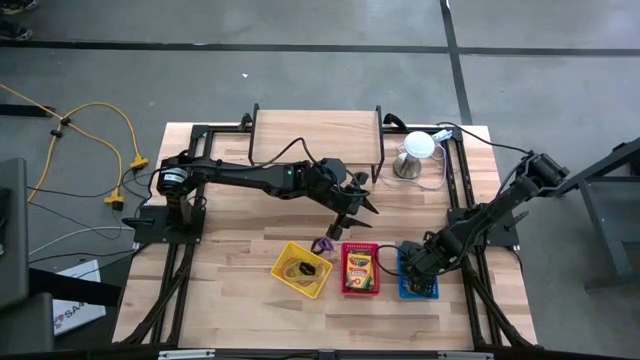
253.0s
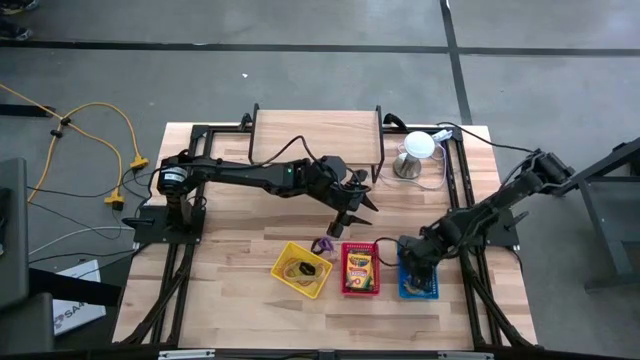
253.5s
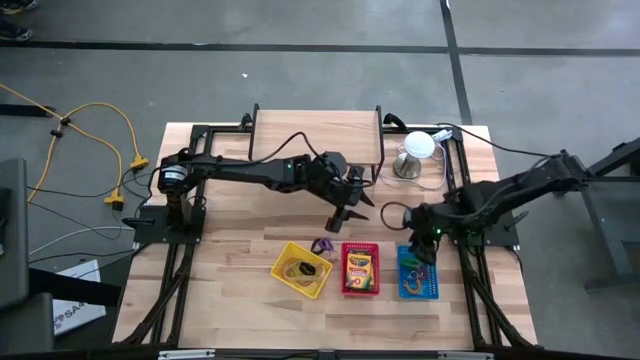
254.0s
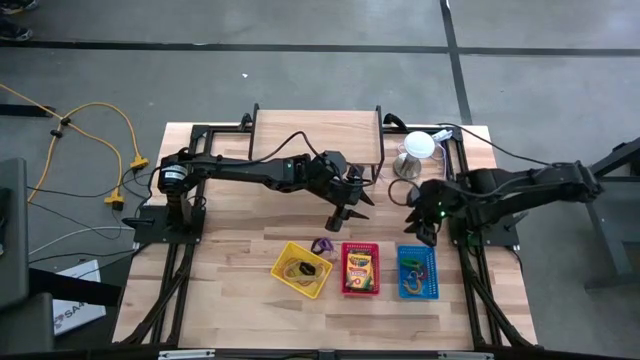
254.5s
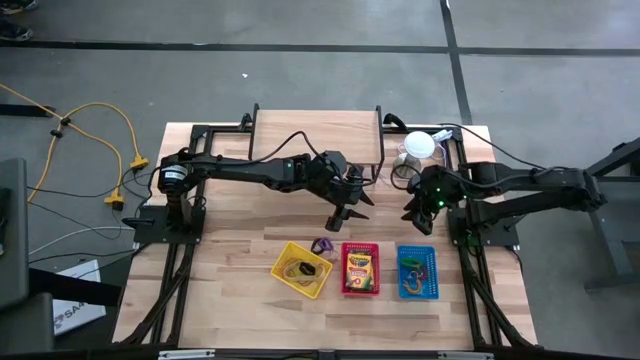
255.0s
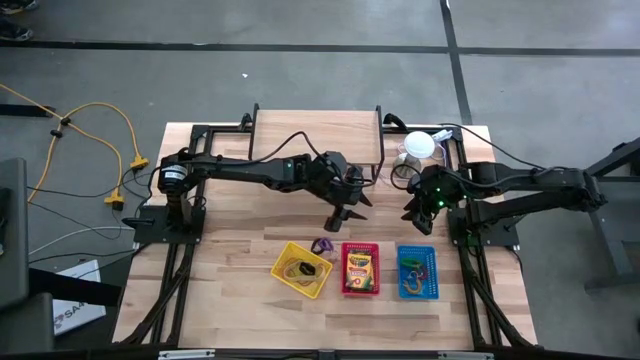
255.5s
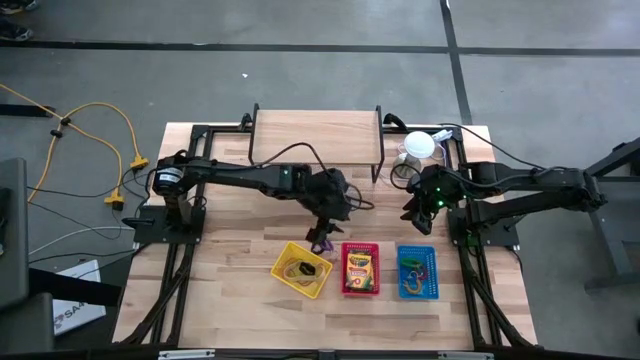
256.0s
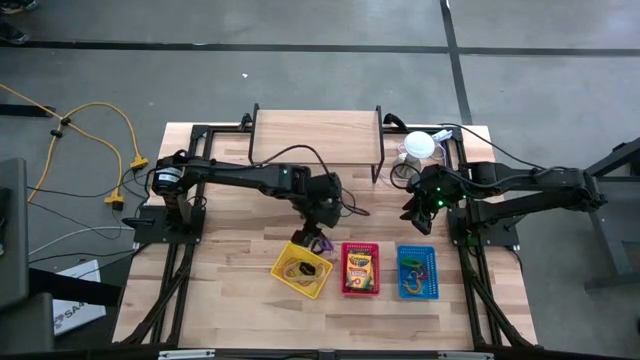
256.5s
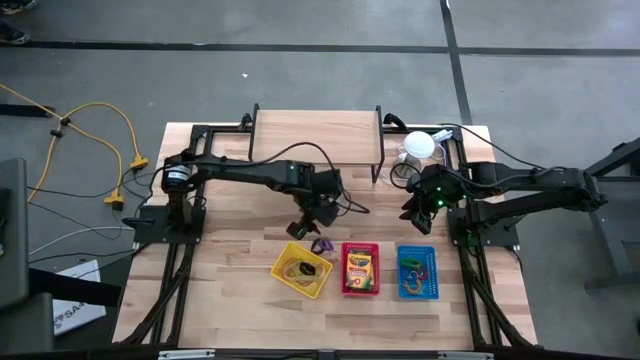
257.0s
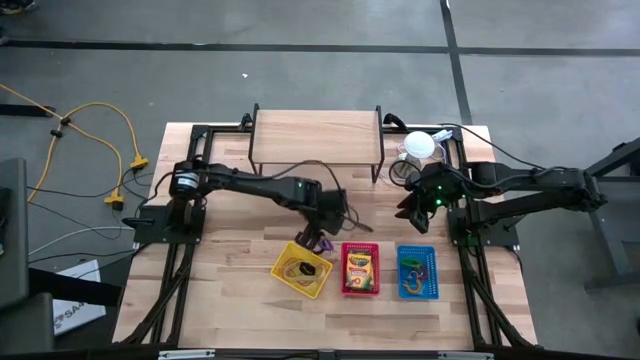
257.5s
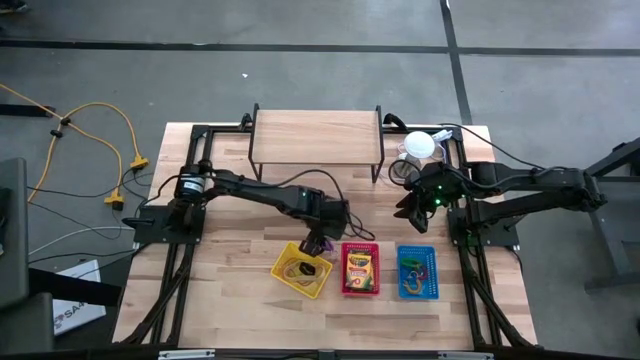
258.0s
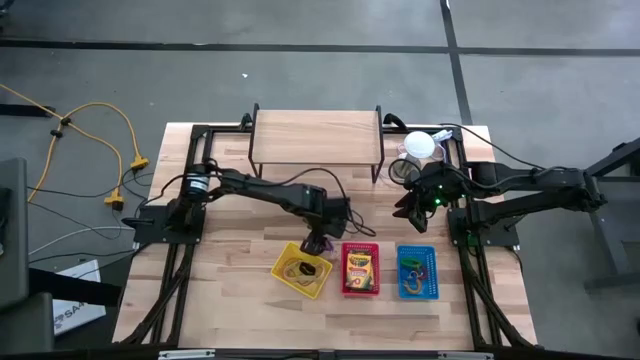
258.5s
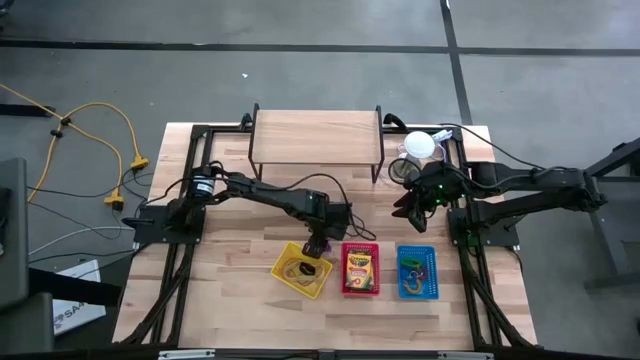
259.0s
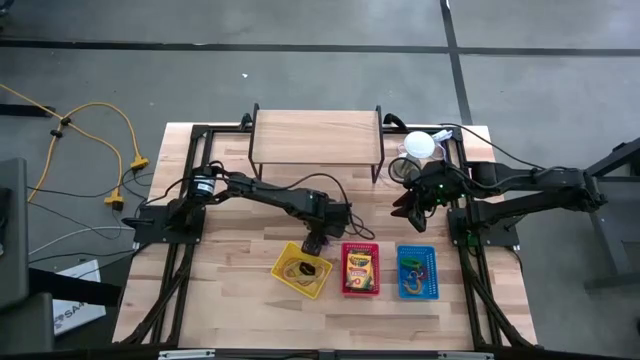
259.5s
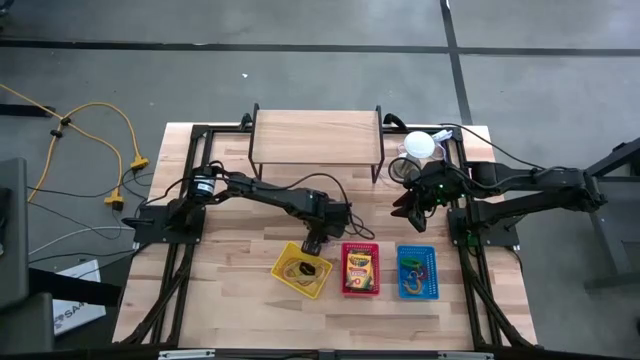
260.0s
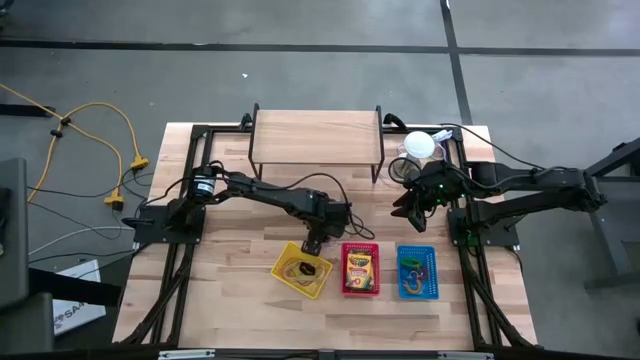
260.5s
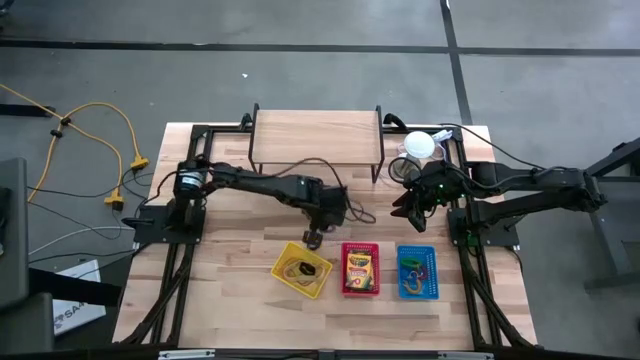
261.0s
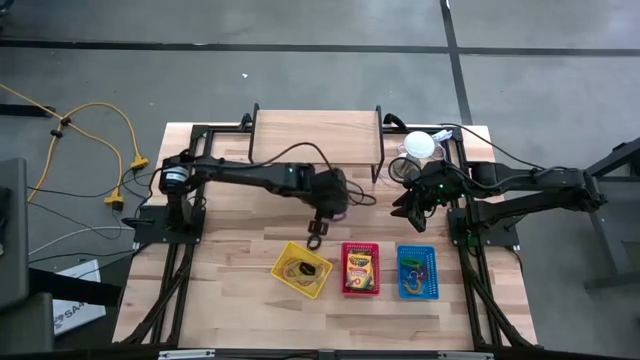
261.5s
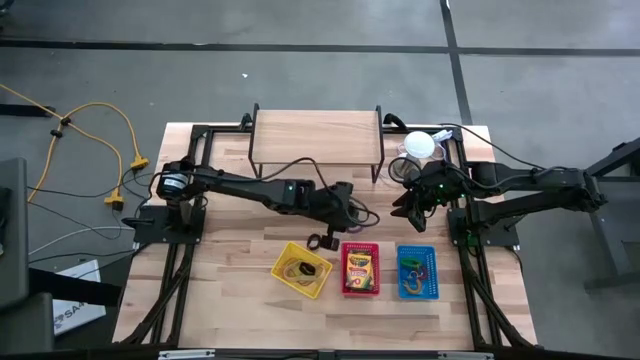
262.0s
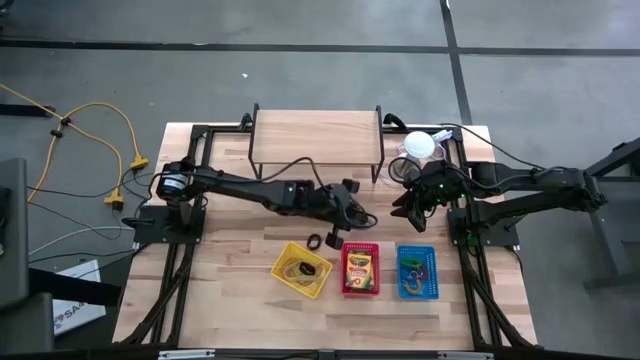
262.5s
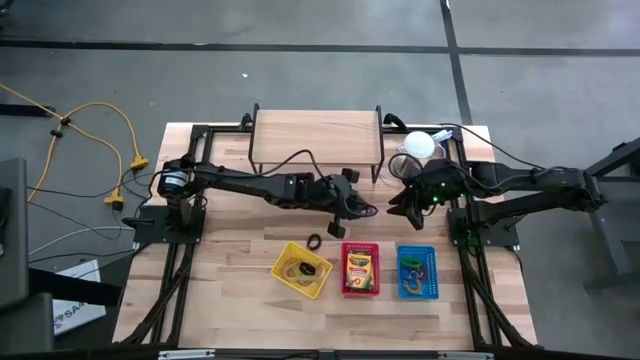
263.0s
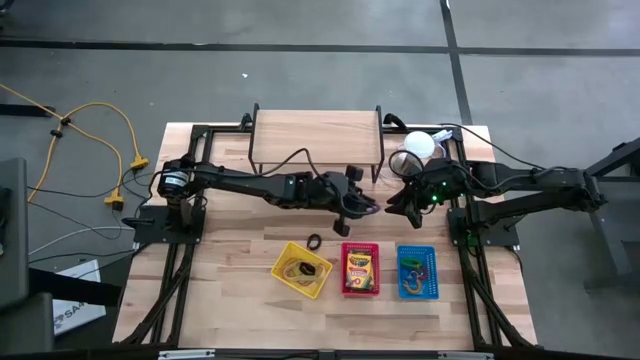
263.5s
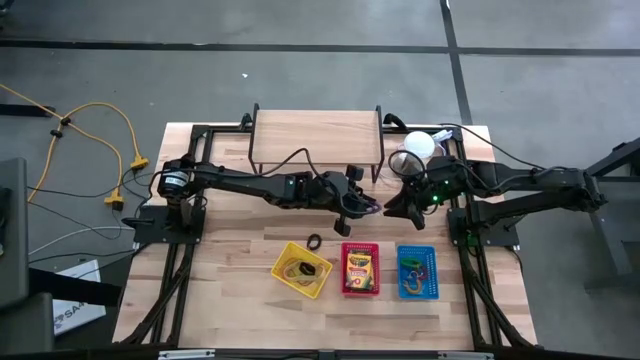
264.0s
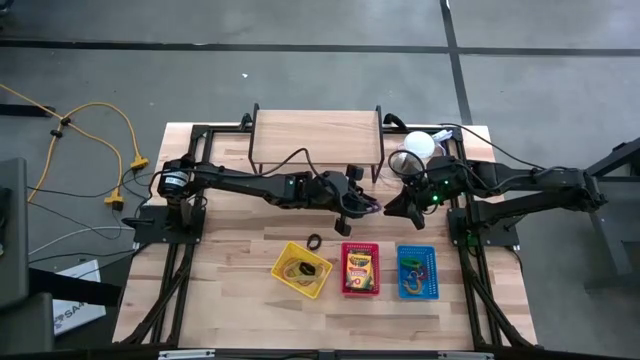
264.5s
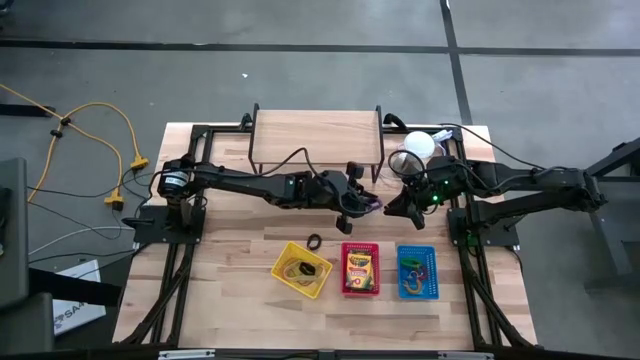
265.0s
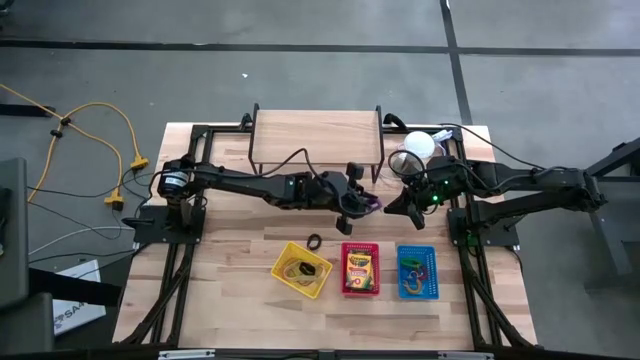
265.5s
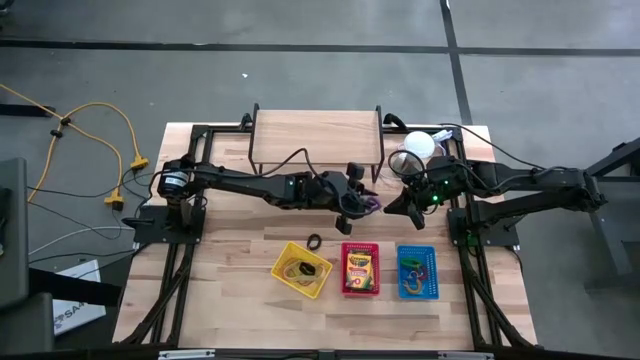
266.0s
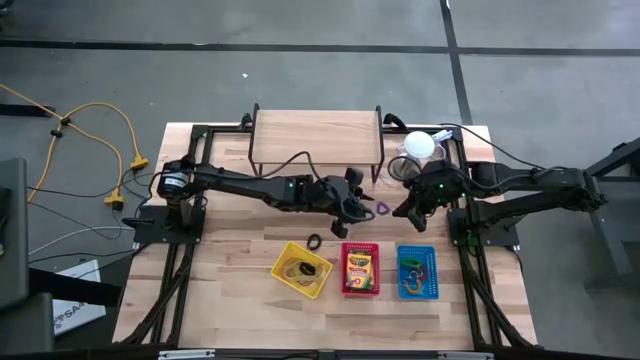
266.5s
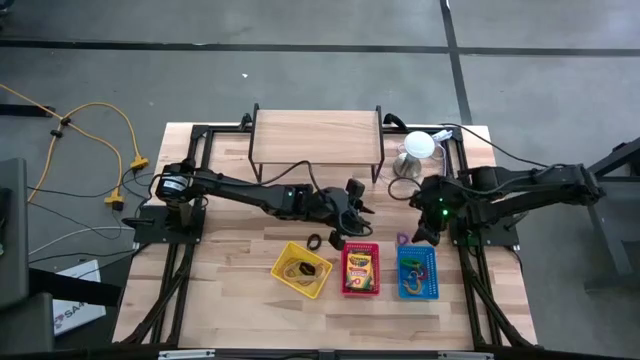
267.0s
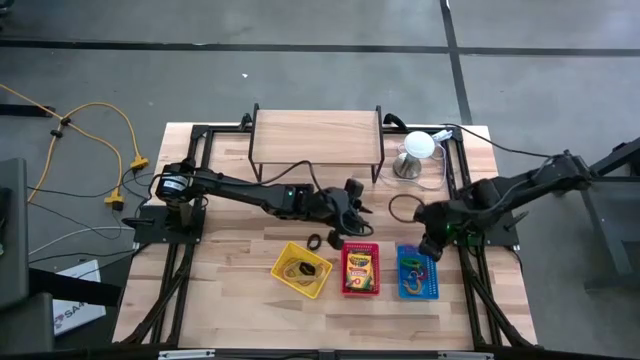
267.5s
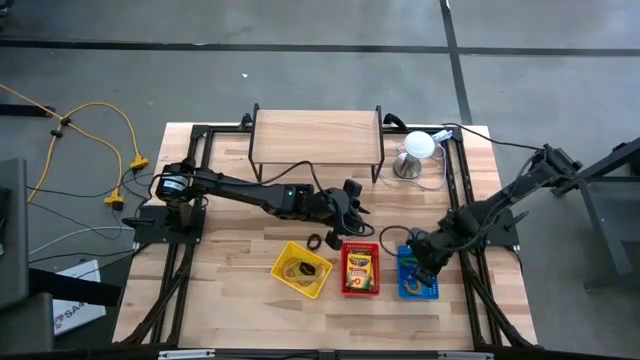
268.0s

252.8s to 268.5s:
Task: Pick & Place Office Desk Supplies
Put the violet spring keychain into the blue bin

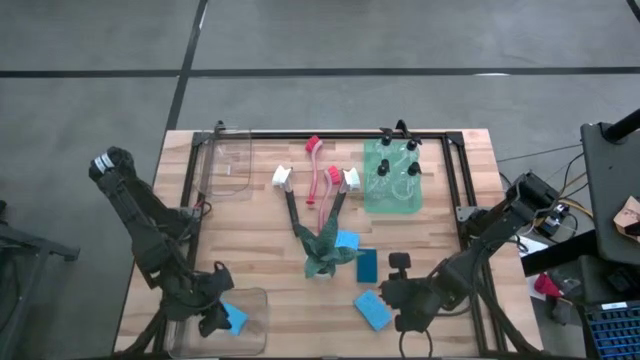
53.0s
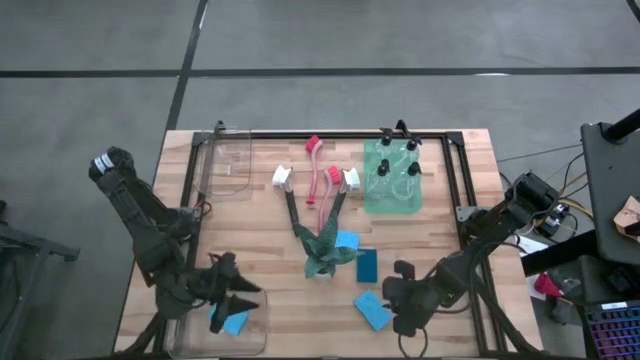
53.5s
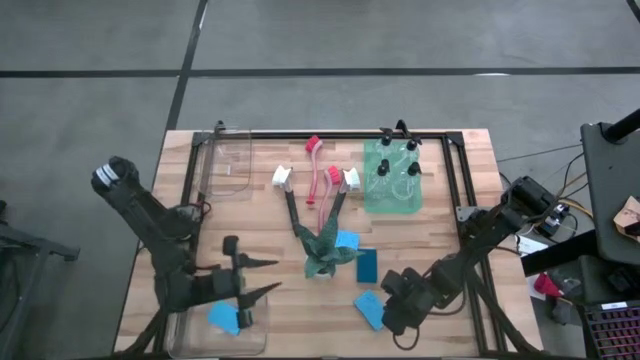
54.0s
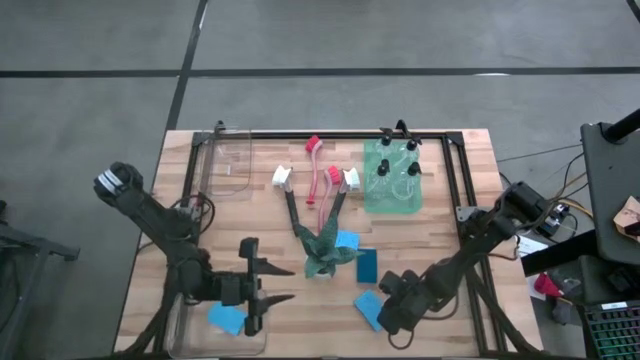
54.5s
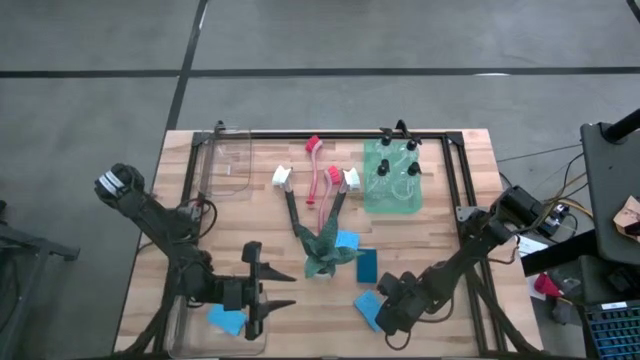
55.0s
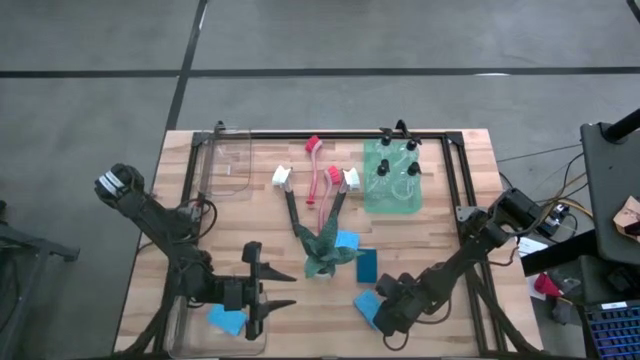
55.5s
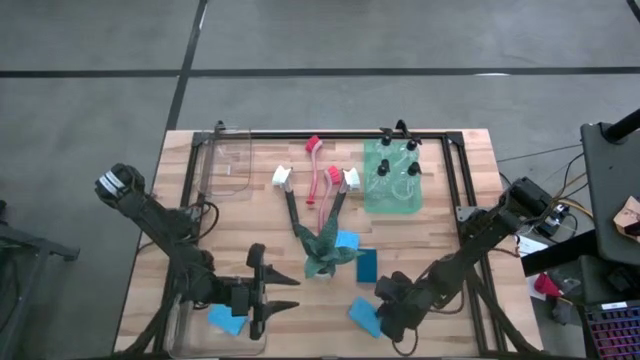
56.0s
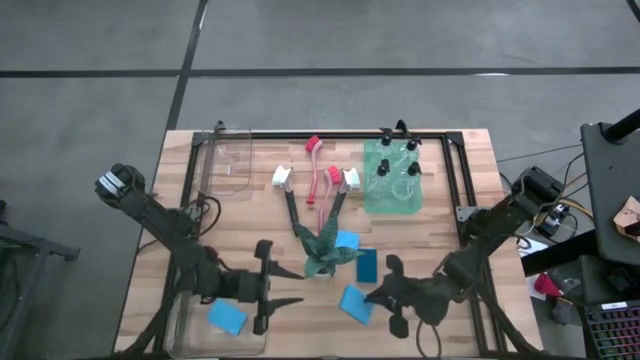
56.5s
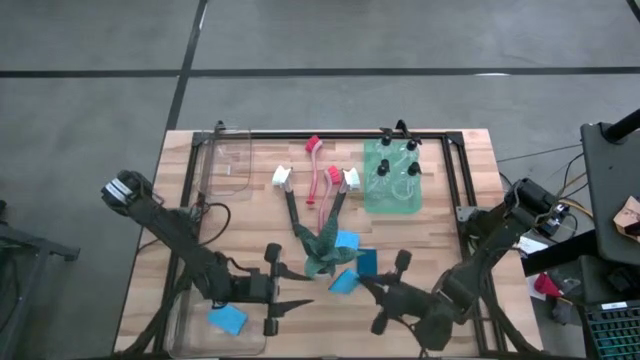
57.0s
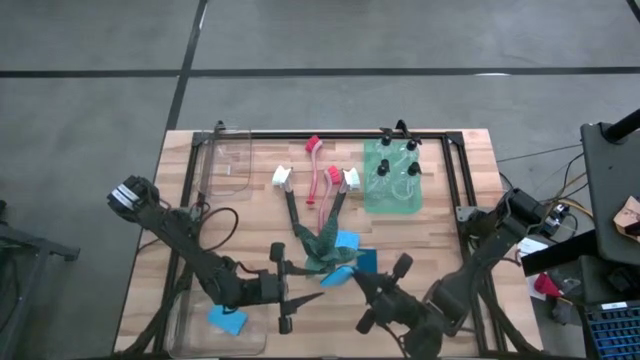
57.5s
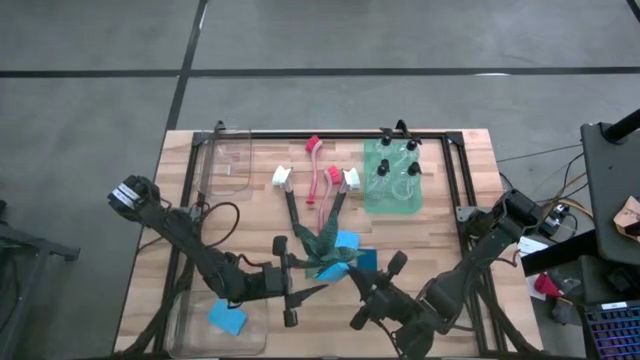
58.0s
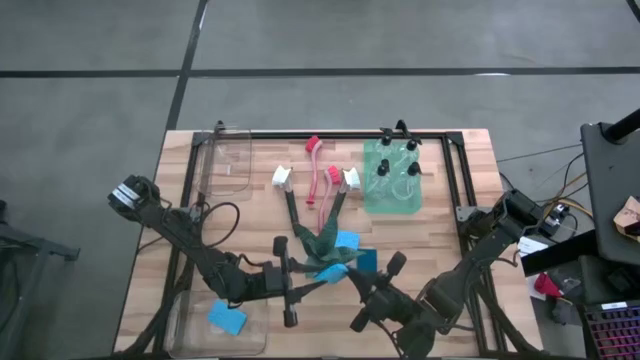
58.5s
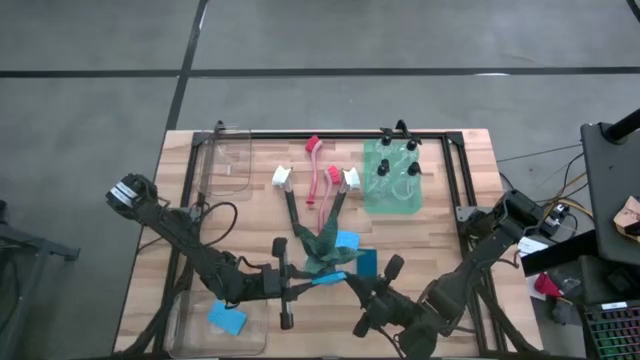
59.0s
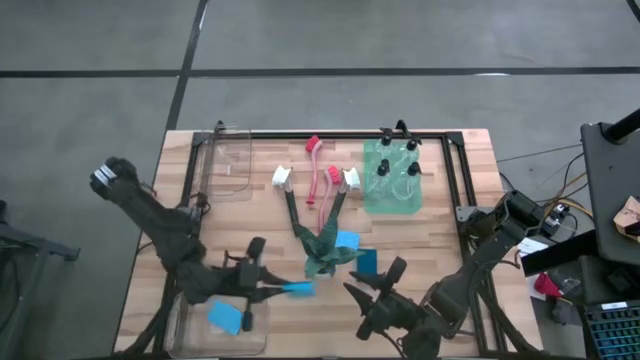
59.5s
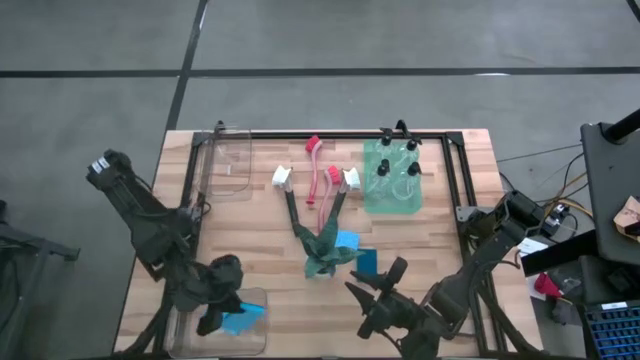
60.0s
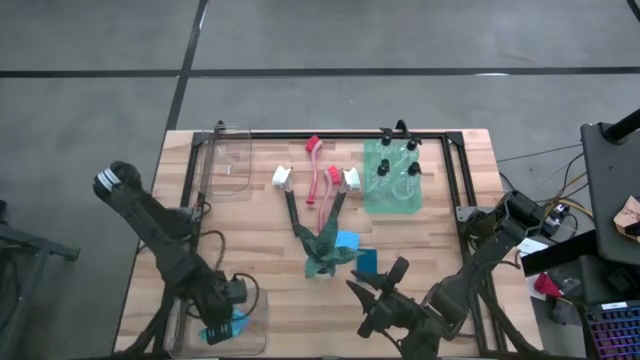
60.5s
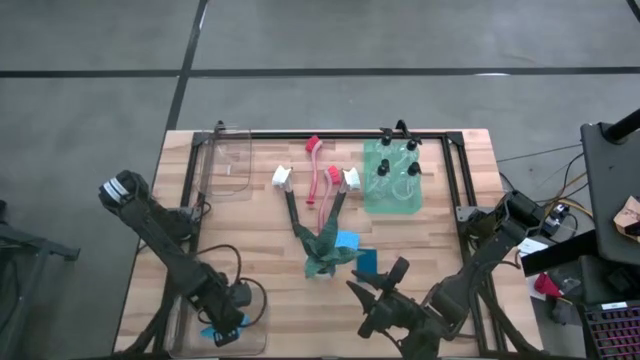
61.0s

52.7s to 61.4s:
Task: Pick & Place Kitchen Sink Supplies
Put the blue sponge into the bottom transparent bin
